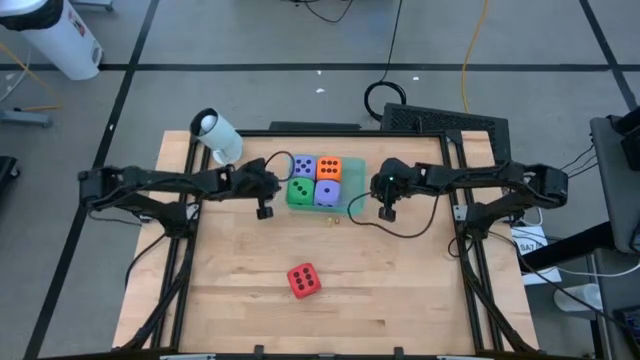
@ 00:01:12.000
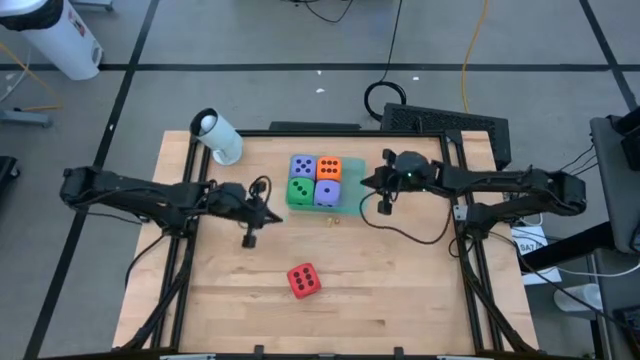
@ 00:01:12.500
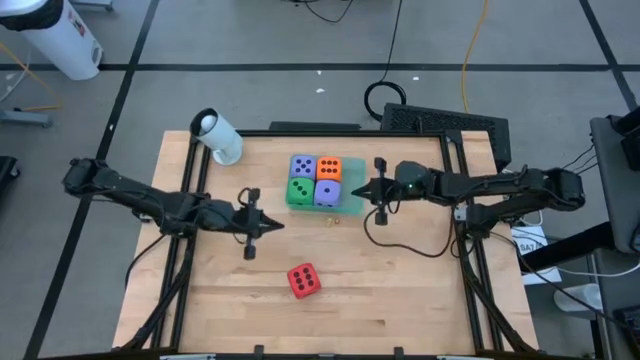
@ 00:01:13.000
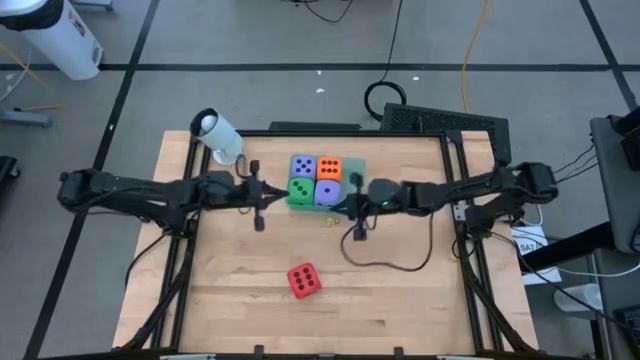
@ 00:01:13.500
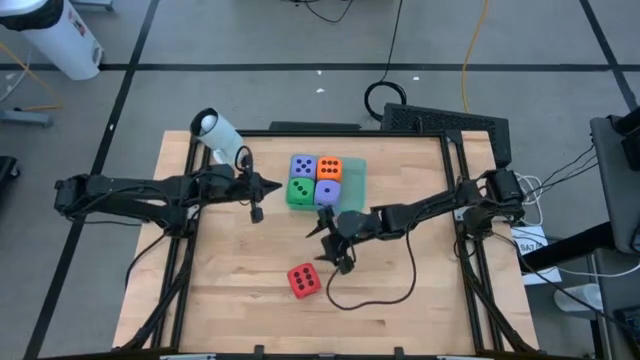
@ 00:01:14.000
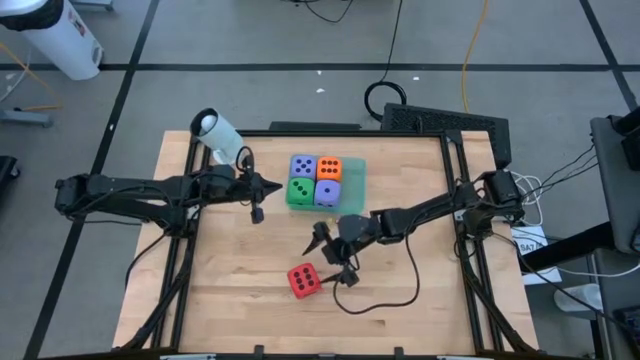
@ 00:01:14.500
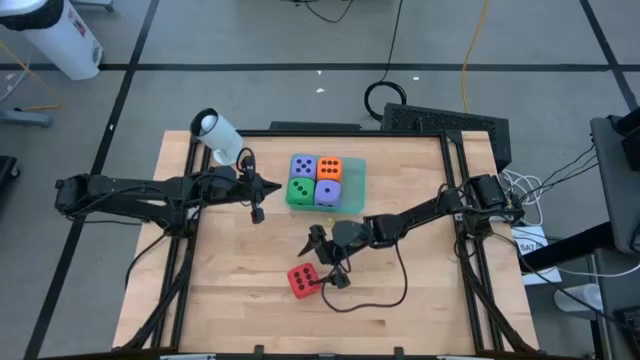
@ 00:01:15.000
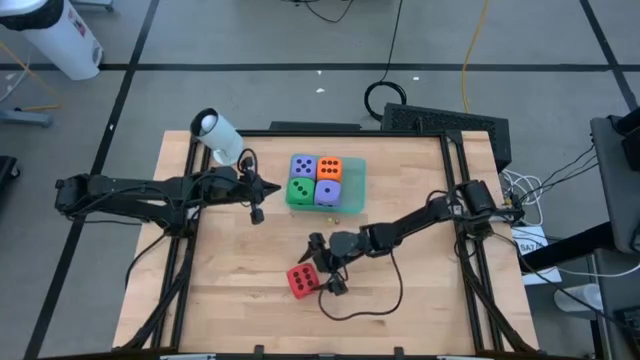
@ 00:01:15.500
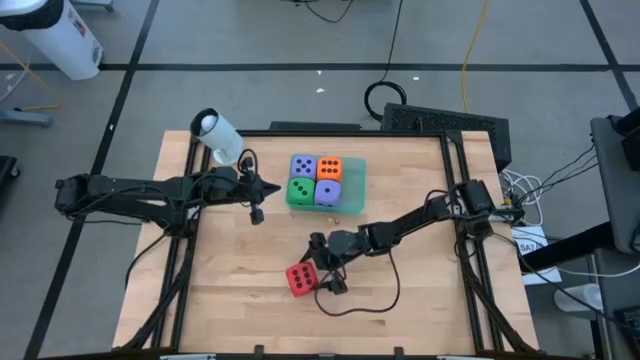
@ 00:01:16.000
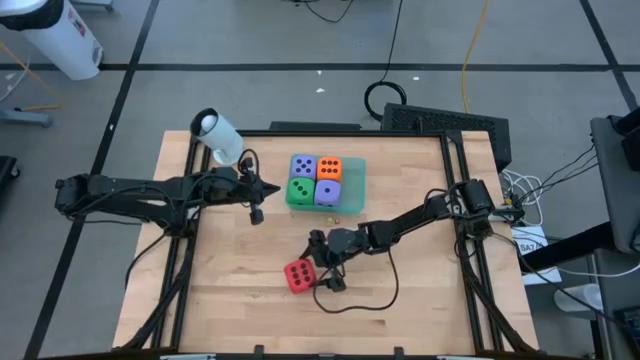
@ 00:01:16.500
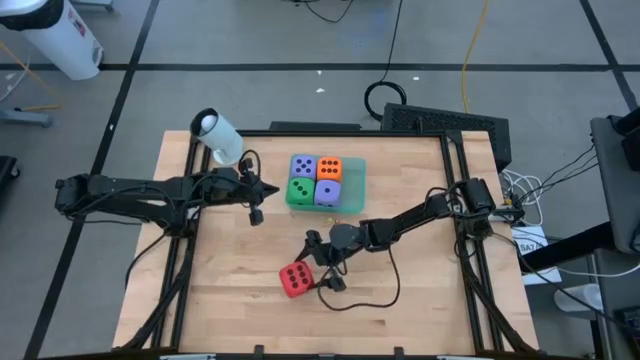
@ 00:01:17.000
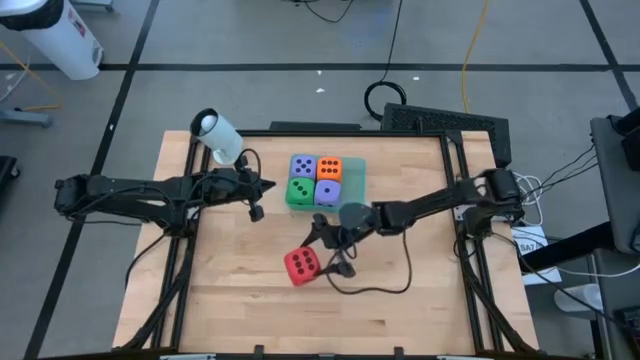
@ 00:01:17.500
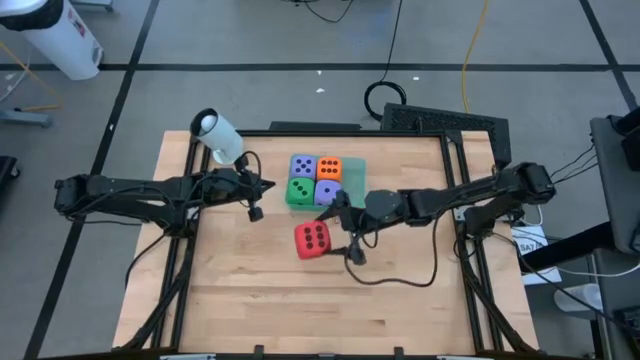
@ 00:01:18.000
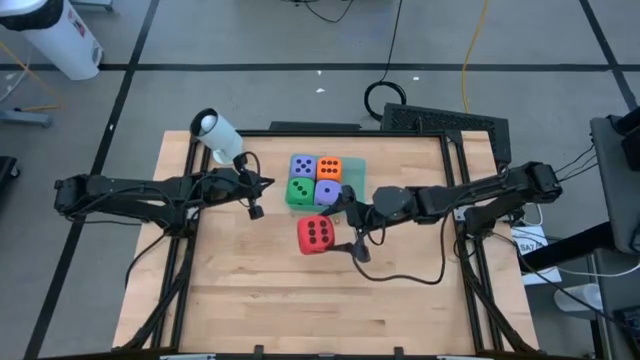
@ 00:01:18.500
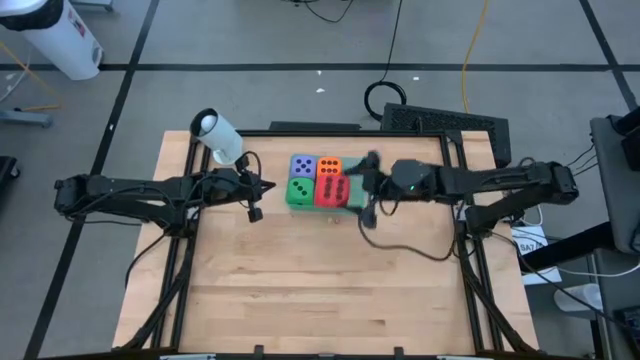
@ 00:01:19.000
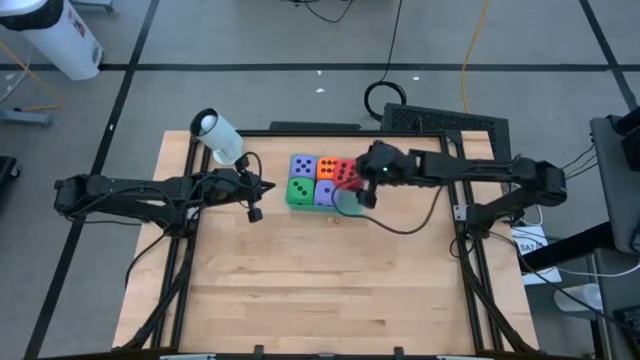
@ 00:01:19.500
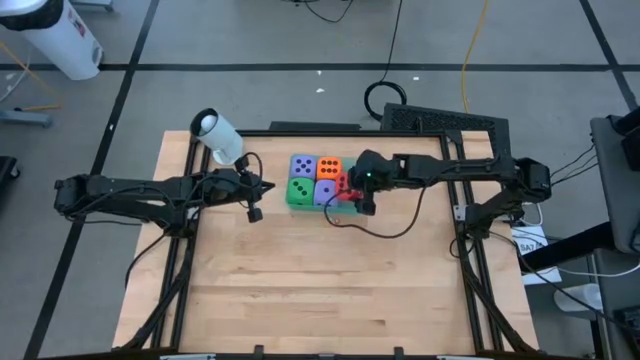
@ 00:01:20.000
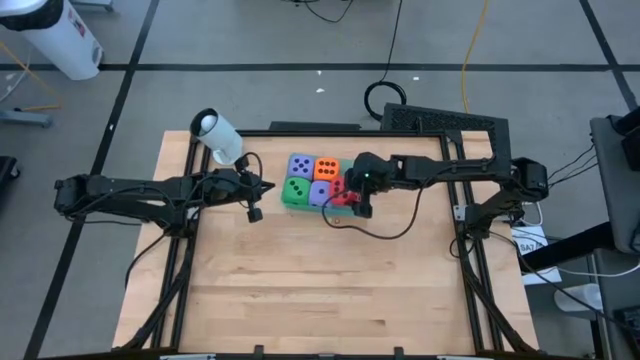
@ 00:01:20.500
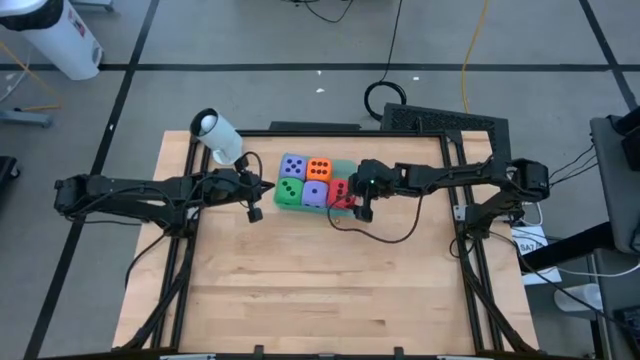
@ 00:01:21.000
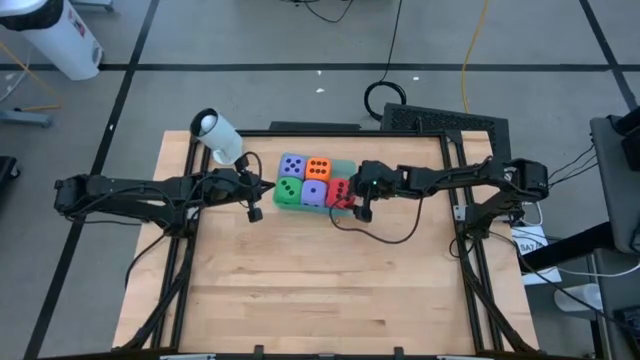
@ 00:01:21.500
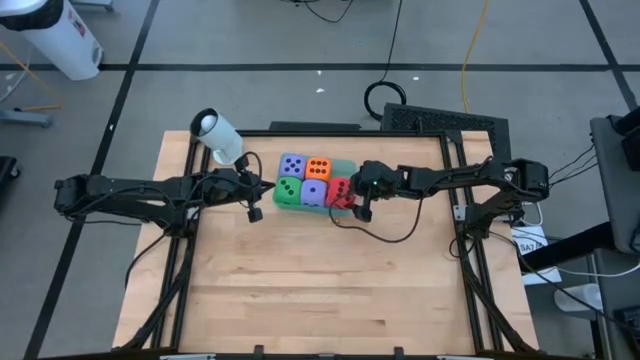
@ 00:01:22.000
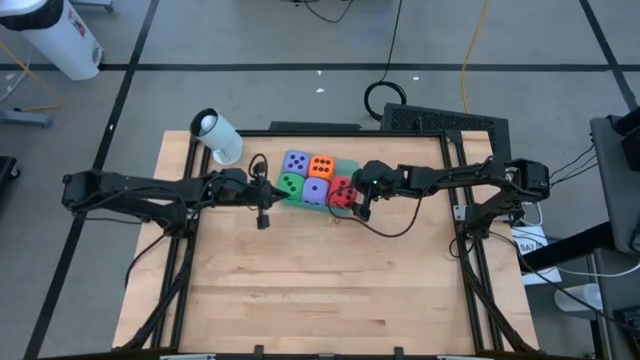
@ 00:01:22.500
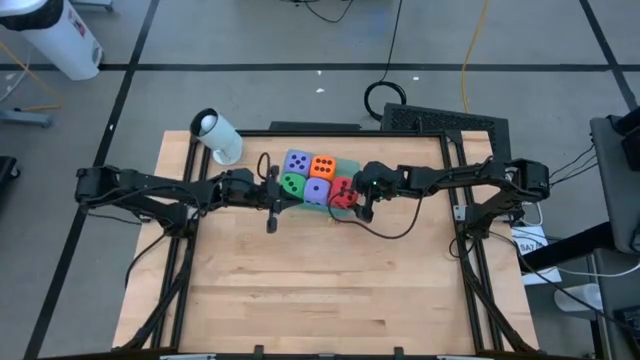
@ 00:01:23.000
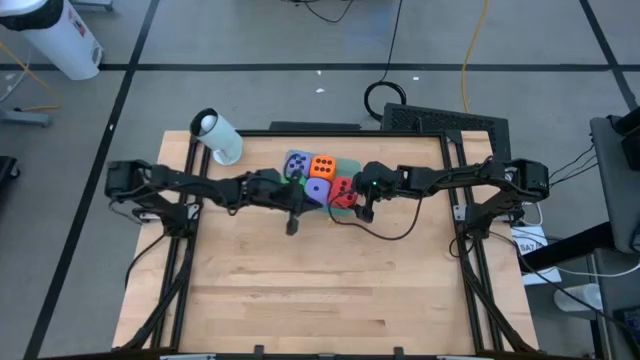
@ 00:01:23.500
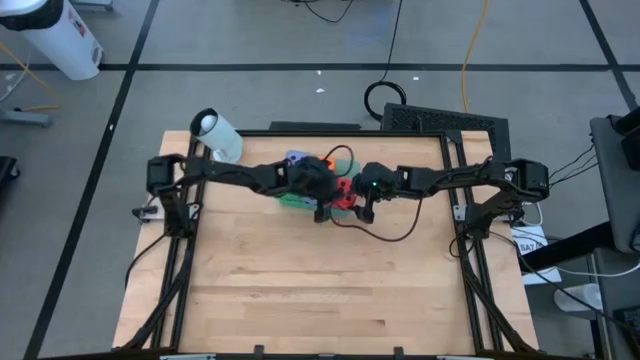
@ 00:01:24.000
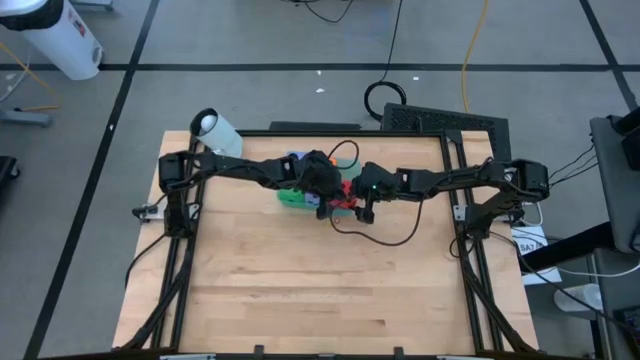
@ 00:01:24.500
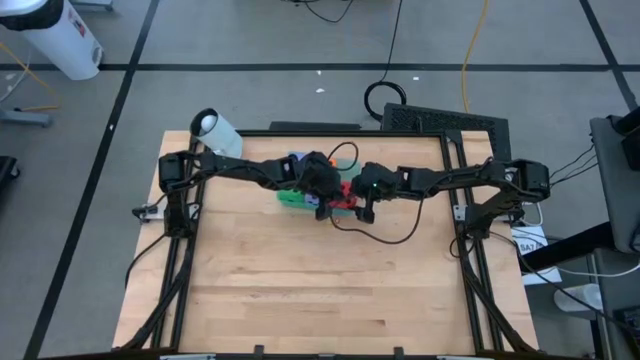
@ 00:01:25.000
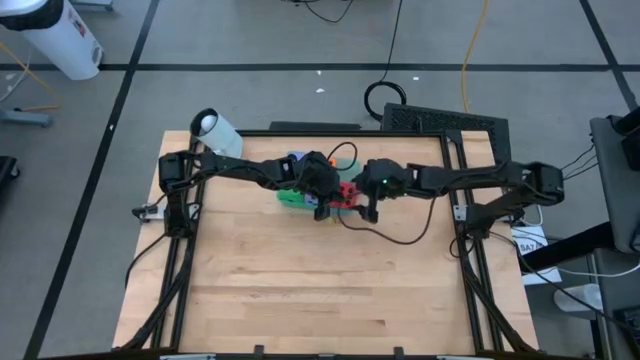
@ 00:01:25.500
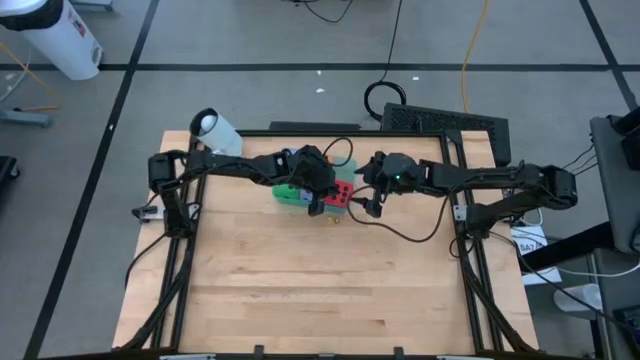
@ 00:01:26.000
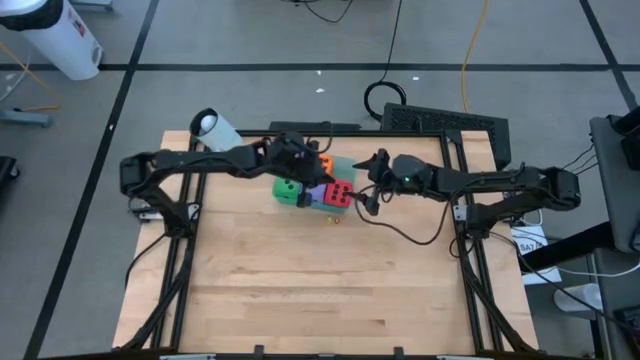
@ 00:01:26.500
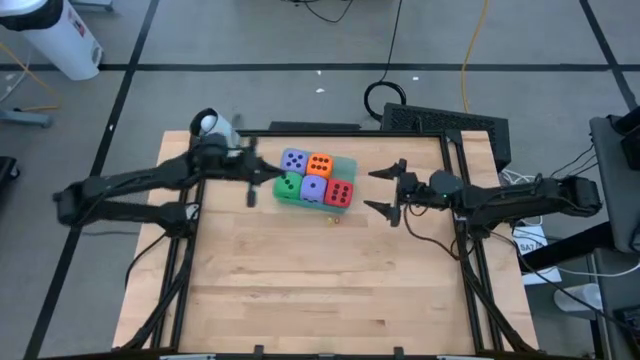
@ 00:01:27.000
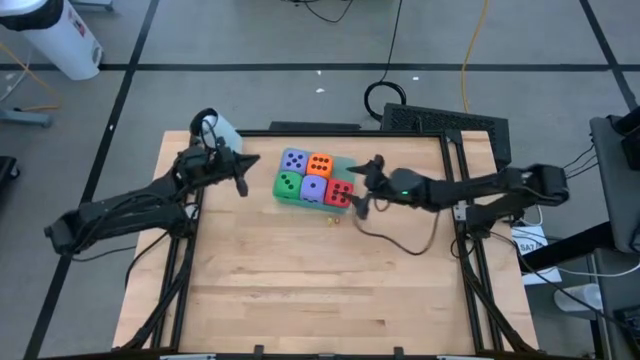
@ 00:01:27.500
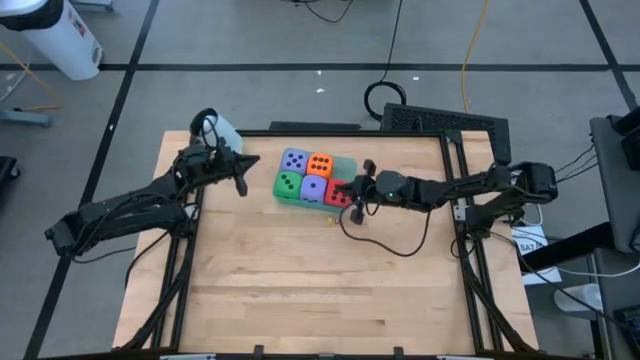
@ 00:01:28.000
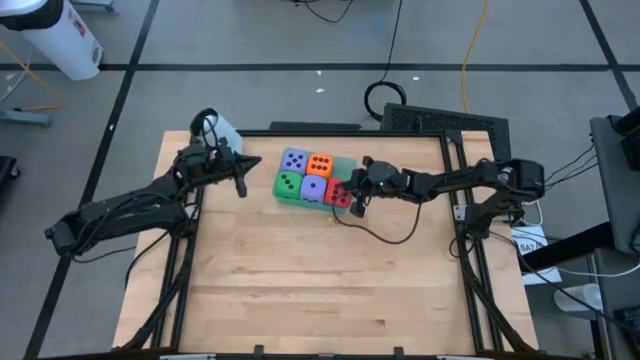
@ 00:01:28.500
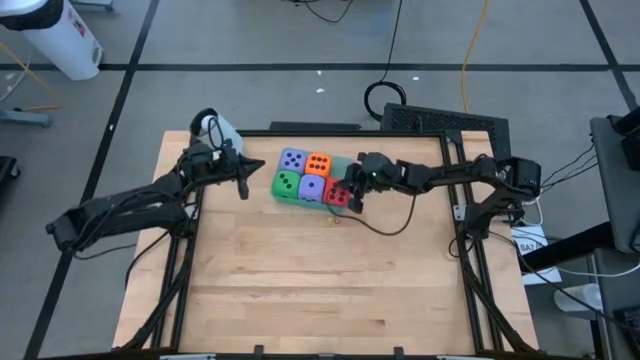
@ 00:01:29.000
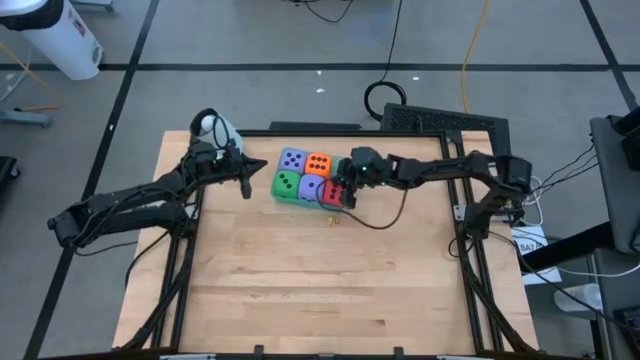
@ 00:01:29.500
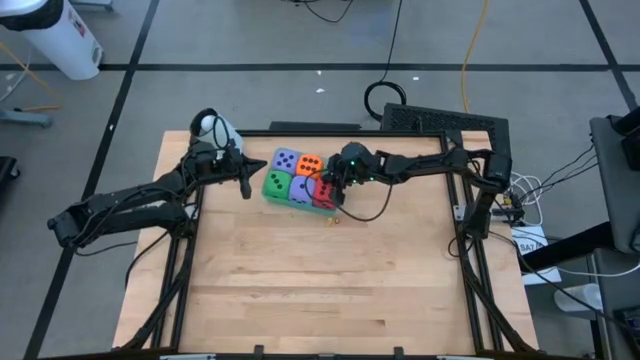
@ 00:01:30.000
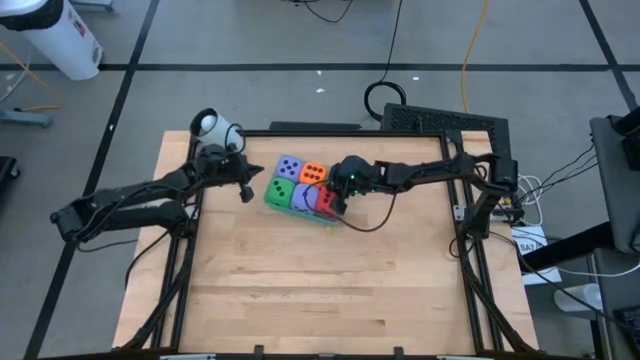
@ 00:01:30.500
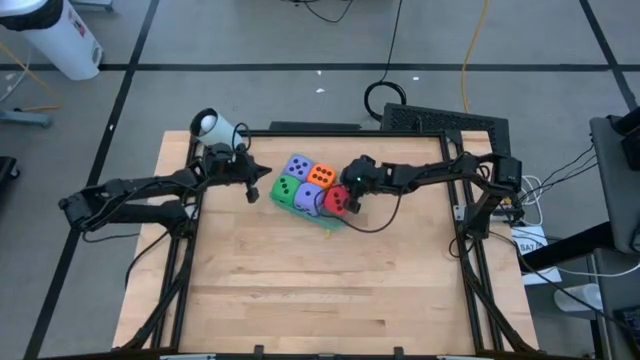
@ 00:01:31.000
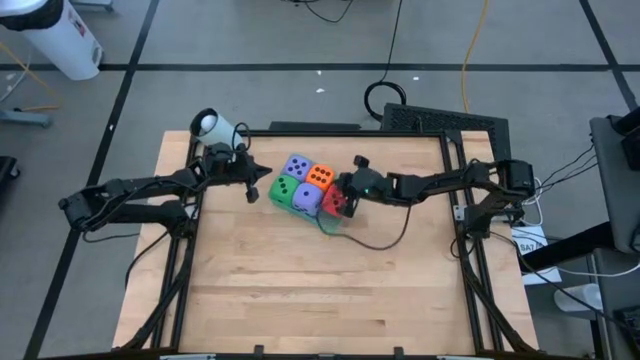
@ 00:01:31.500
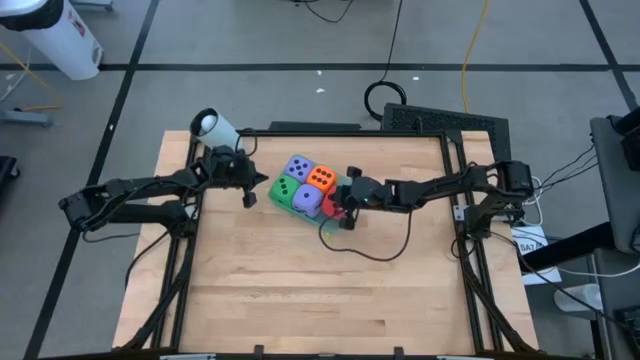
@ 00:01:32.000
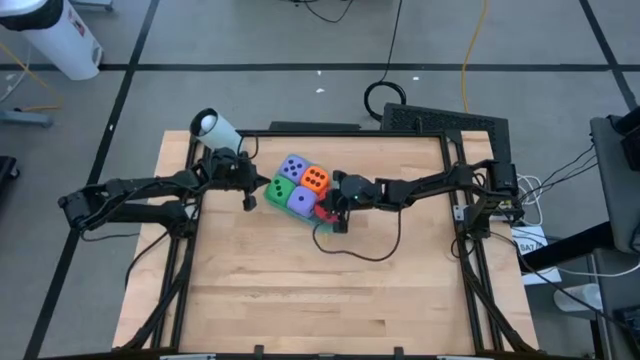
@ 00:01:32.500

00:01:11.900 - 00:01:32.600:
Task: Pick & Place Dice
Put the large red dice into the blue bin
